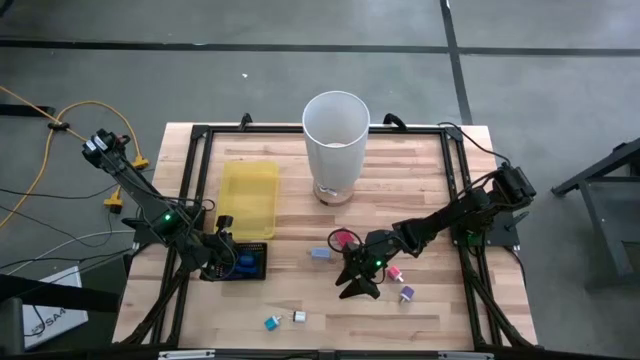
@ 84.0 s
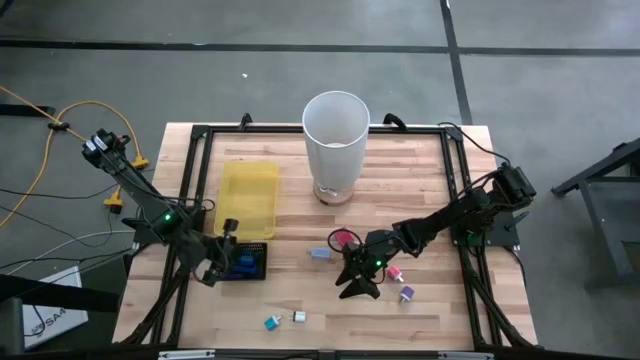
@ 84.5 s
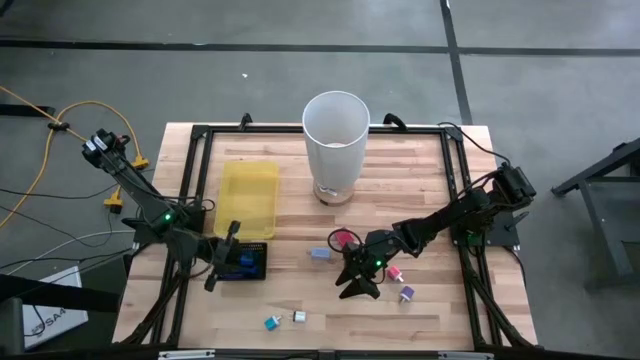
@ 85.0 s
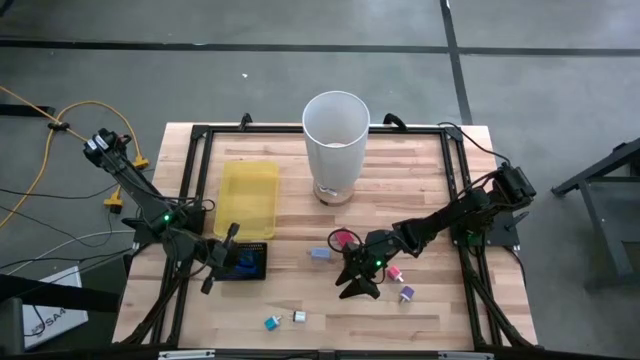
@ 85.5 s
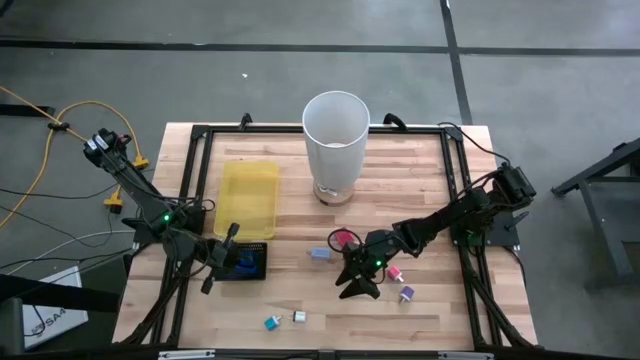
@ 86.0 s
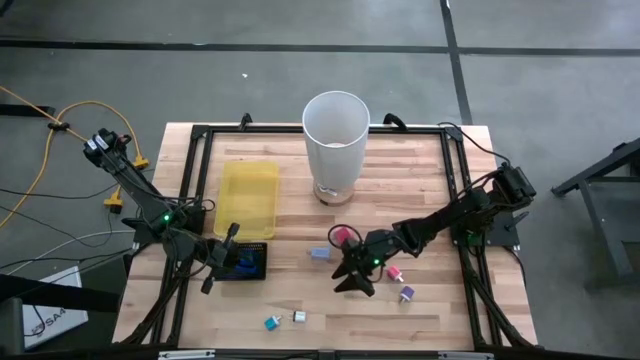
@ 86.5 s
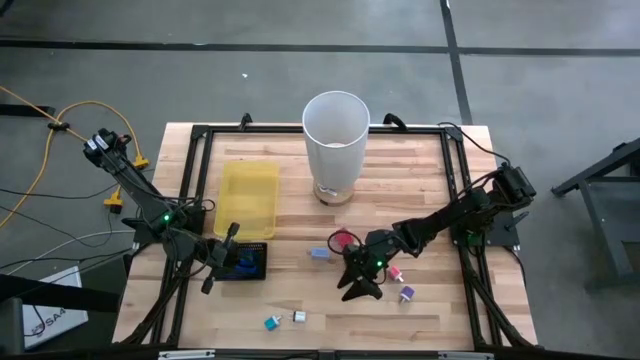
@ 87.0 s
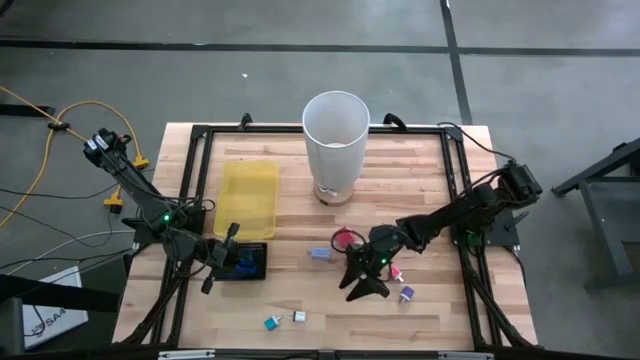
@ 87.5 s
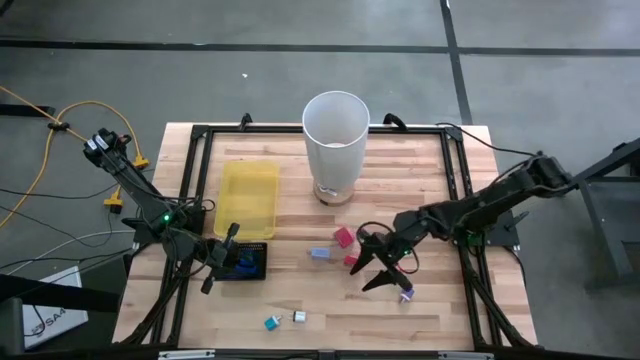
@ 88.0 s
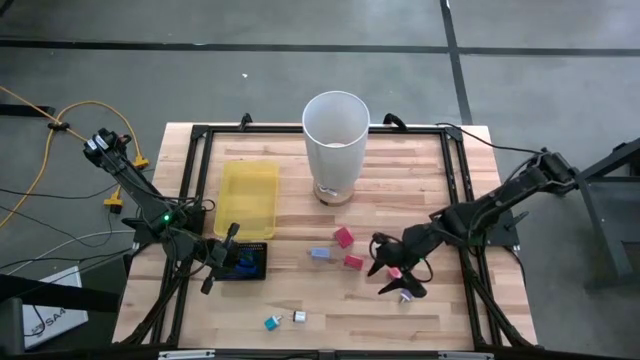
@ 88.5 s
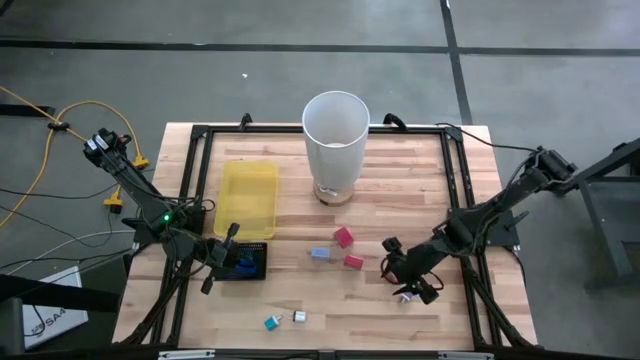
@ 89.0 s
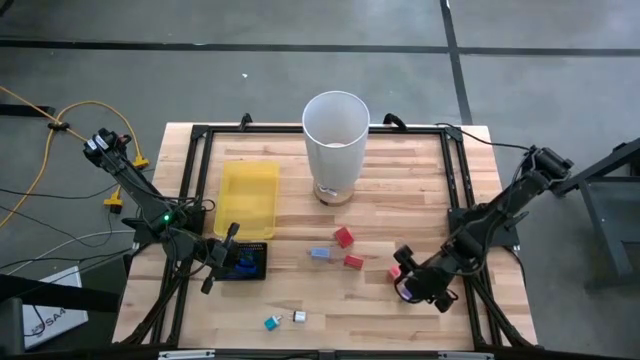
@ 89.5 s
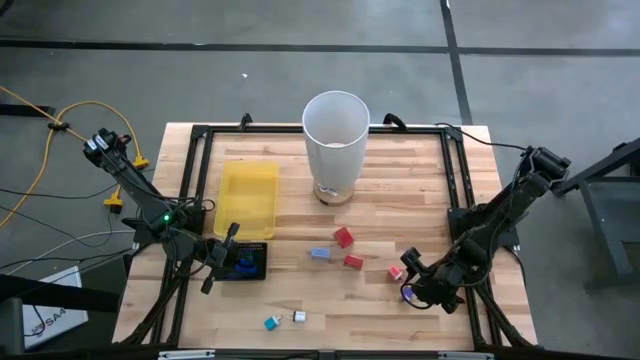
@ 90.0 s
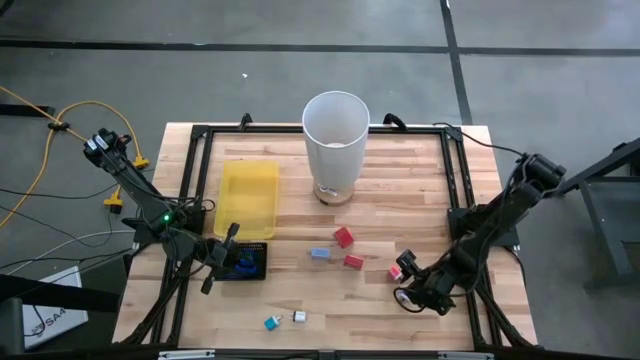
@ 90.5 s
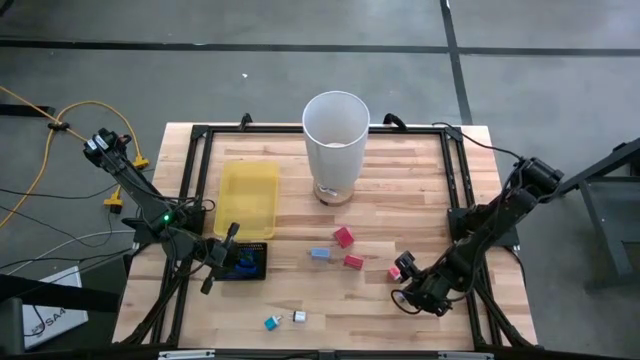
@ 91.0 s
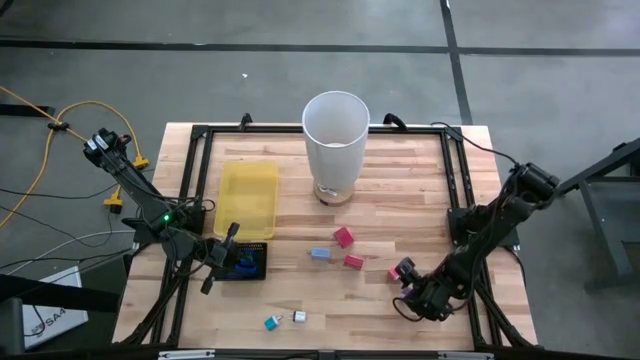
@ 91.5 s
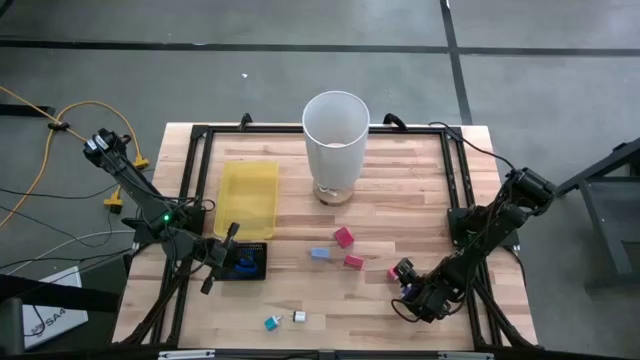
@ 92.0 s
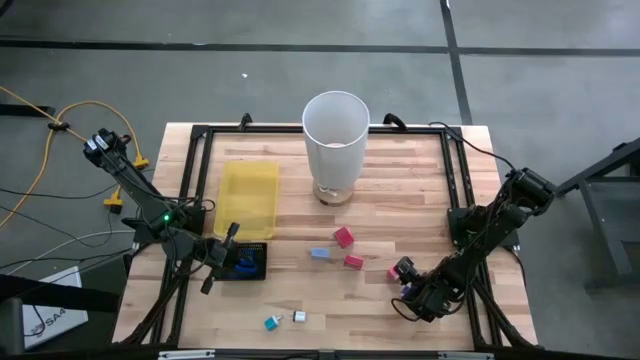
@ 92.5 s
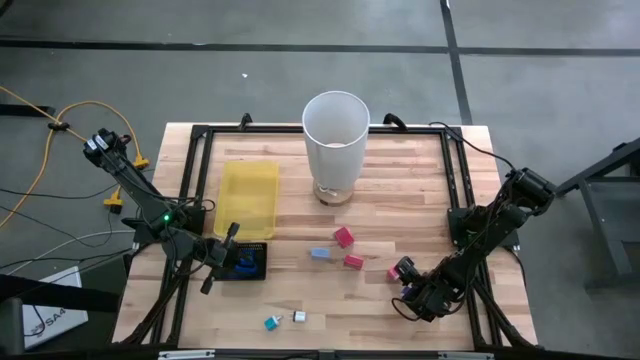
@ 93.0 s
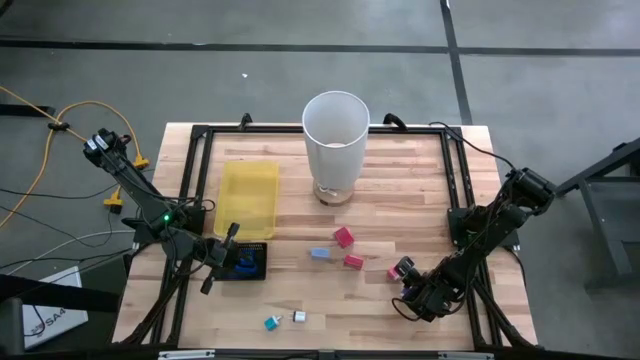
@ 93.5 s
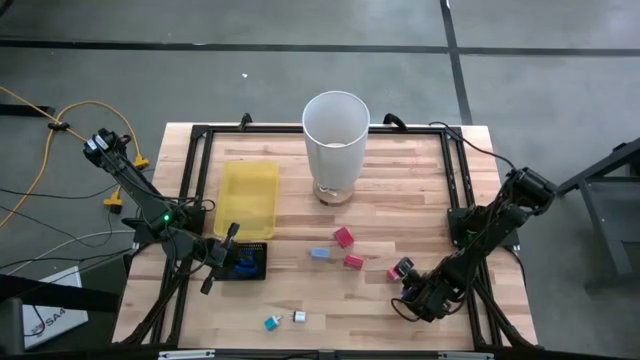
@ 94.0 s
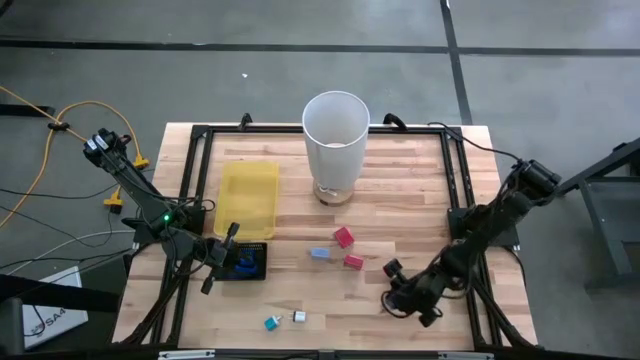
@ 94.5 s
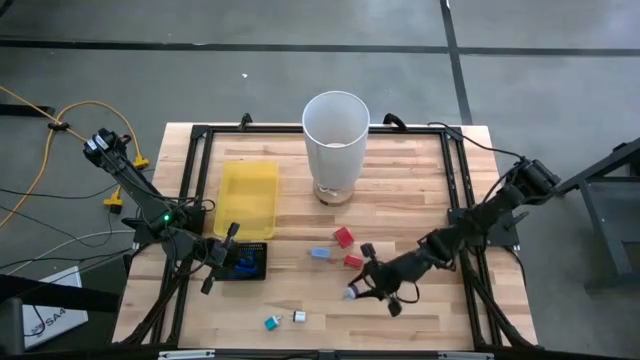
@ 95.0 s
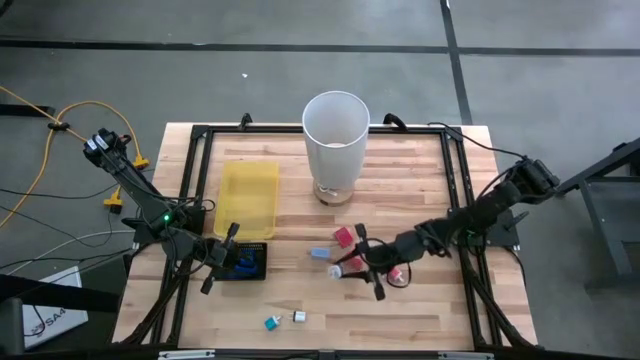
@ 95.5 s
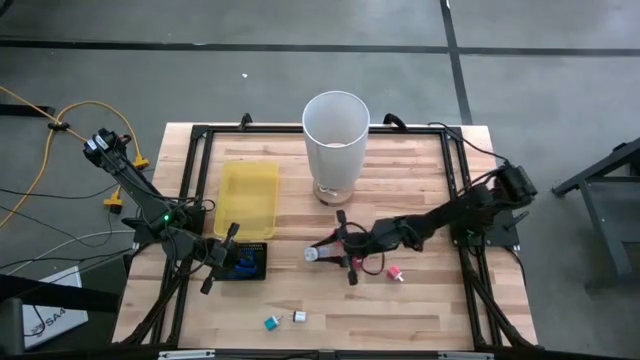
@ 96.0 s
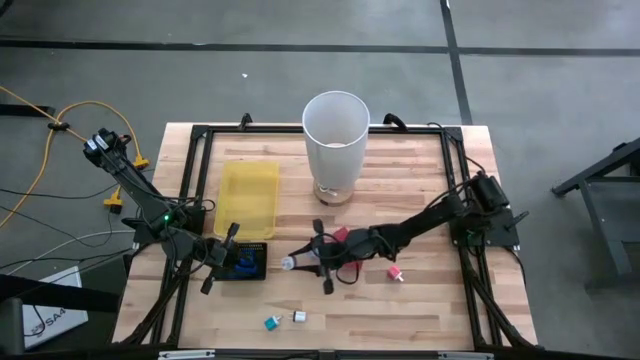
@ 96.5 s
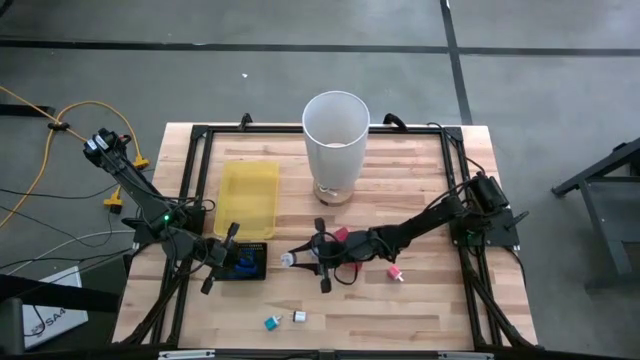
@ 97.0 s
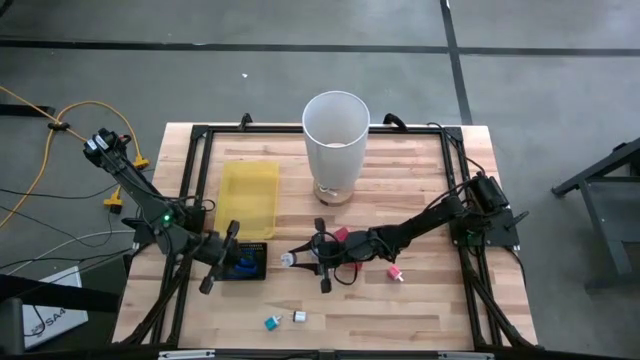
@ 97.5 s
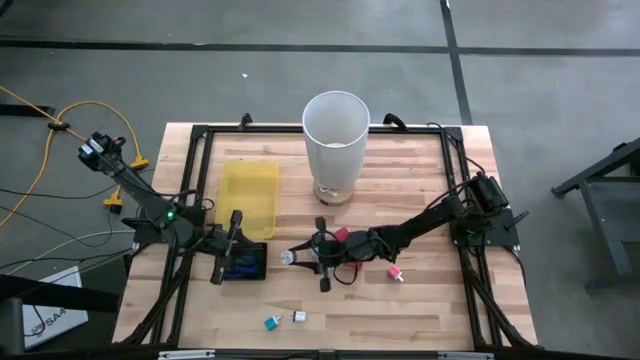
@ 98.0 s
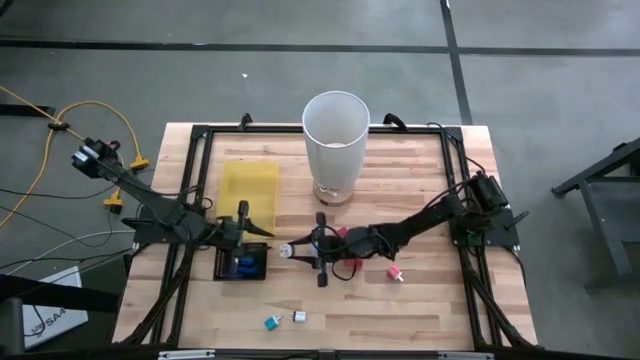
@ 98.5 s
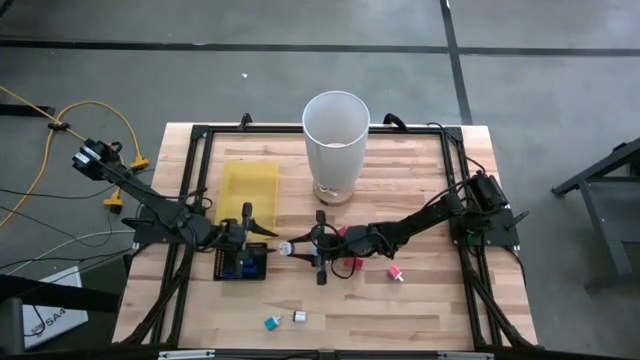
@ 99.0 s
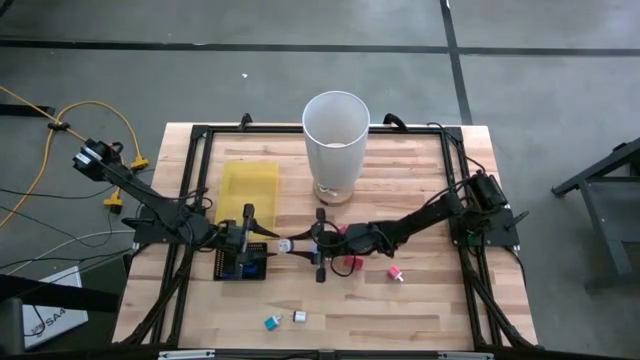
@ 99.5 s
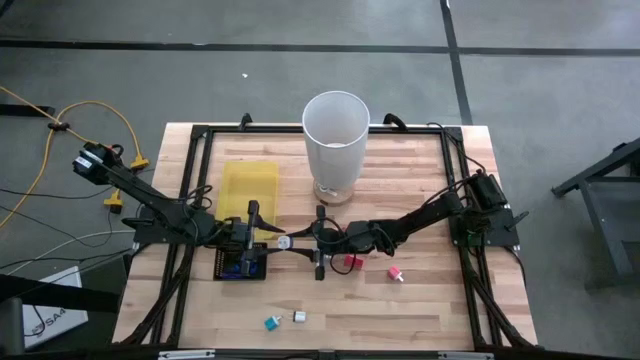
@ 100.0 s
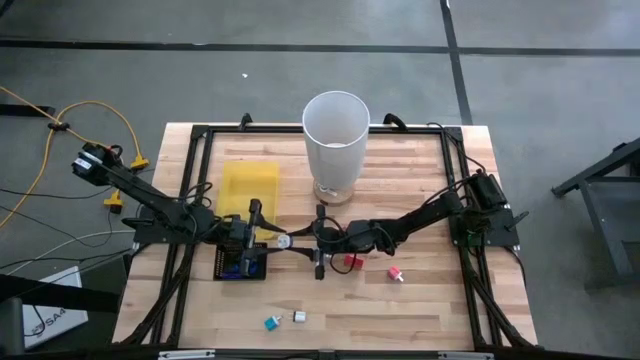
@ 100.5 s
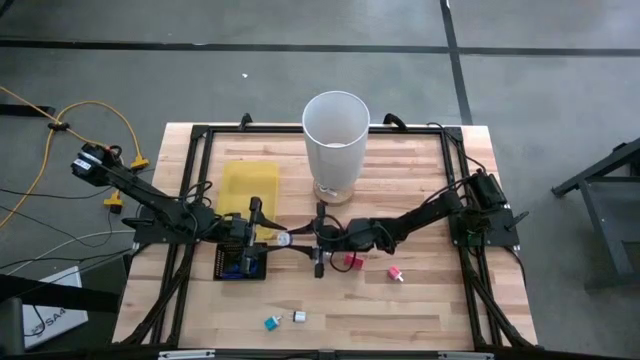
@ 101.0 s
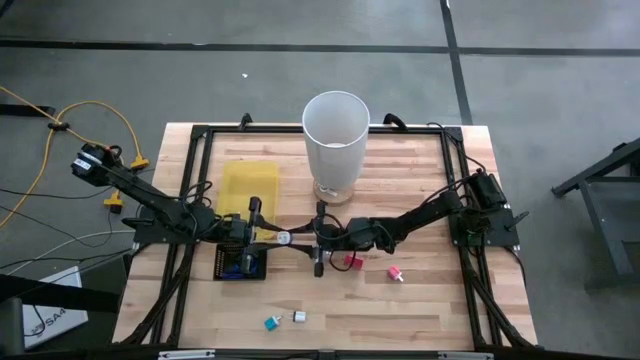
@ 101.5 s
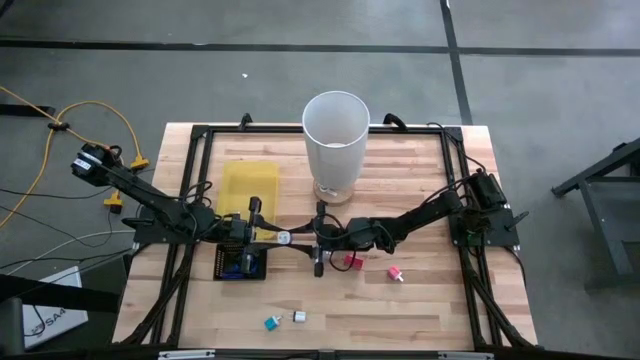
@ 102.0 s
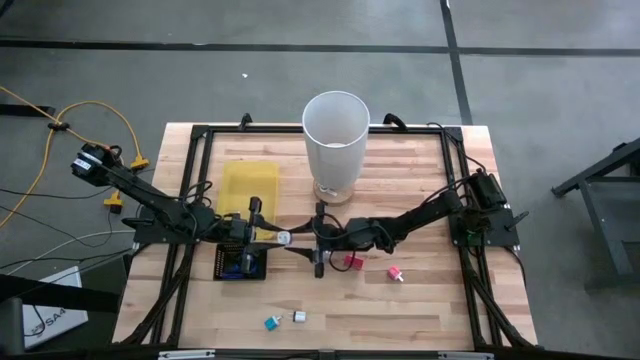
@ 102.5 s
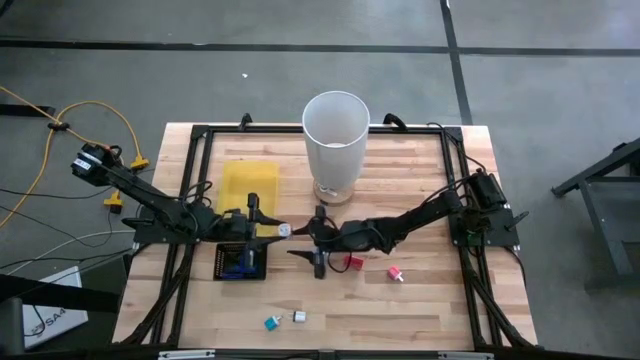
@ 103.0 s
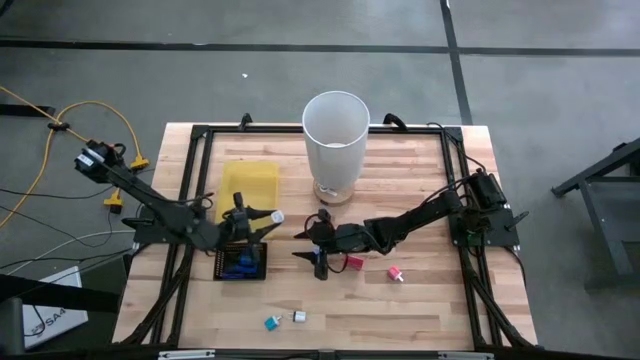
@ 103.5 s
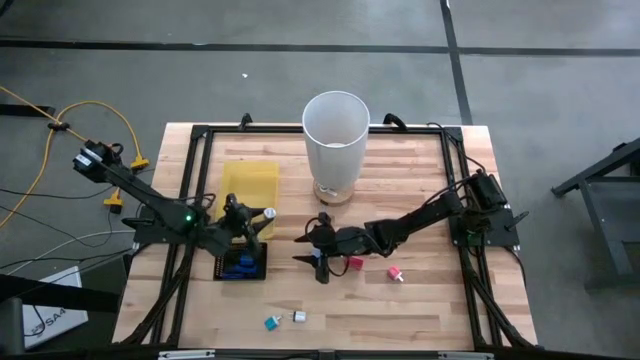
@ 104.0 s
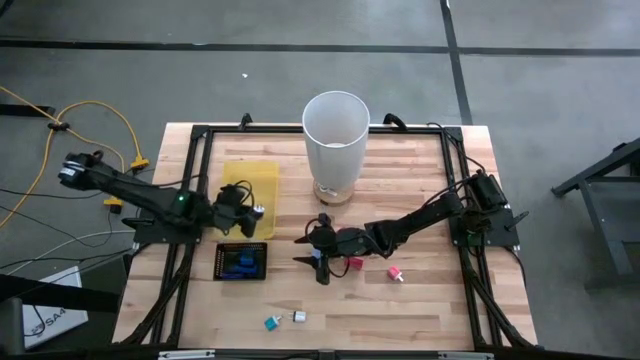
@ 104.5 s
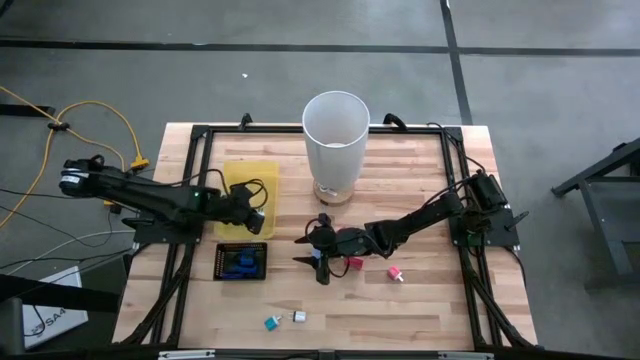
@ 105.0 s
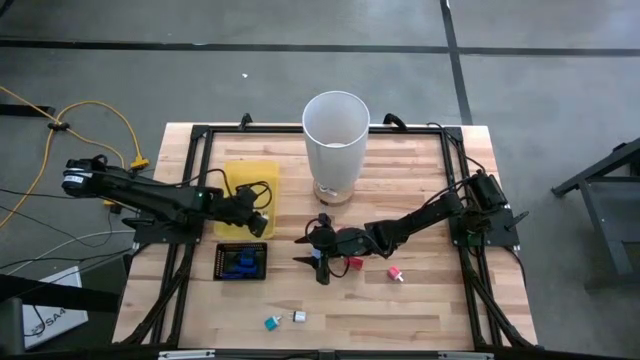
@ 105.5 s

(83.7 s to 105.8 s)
Task: Pick & Place Office items
Put the violet charger adapter into the yellow bin
